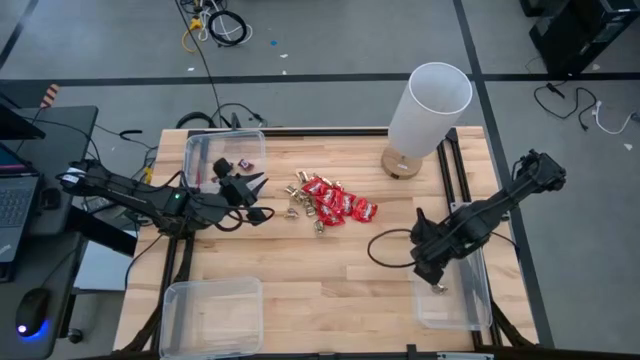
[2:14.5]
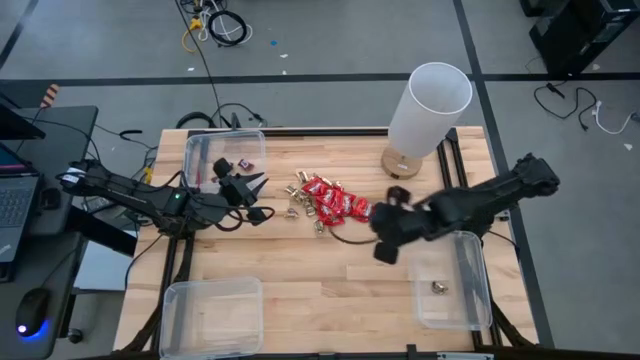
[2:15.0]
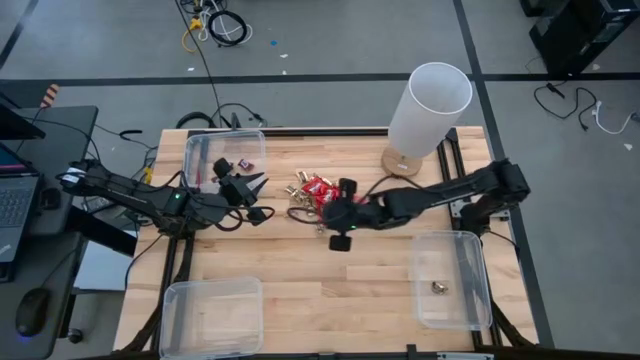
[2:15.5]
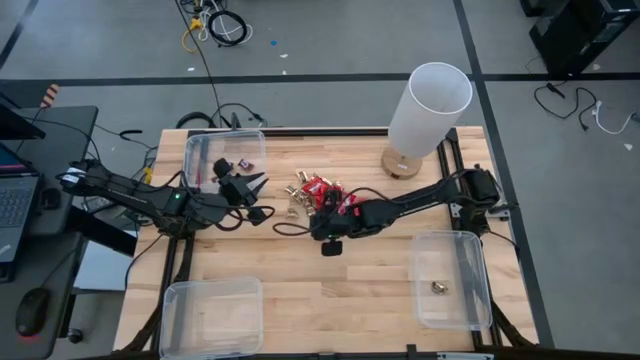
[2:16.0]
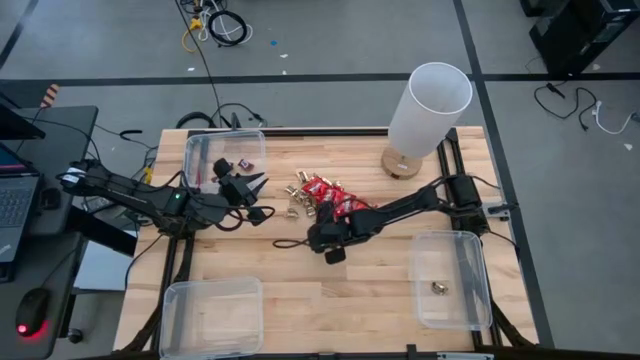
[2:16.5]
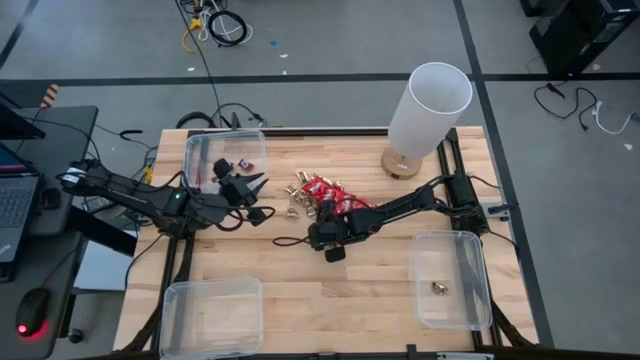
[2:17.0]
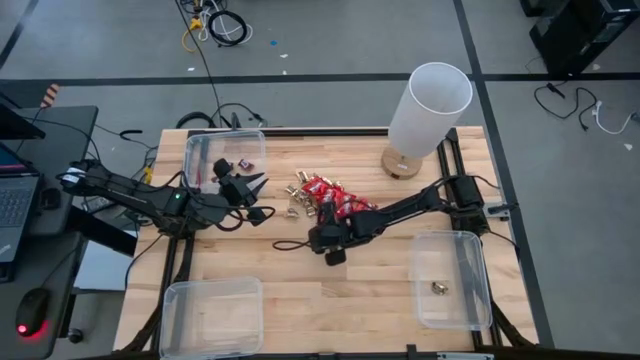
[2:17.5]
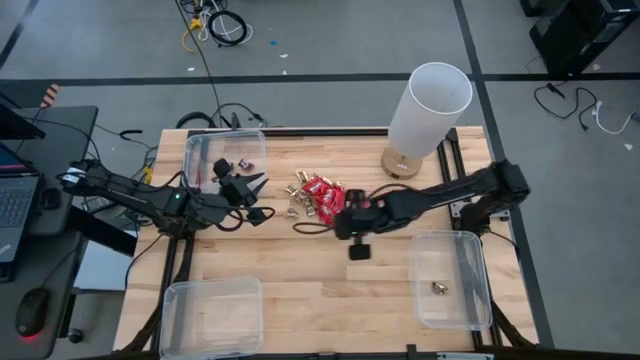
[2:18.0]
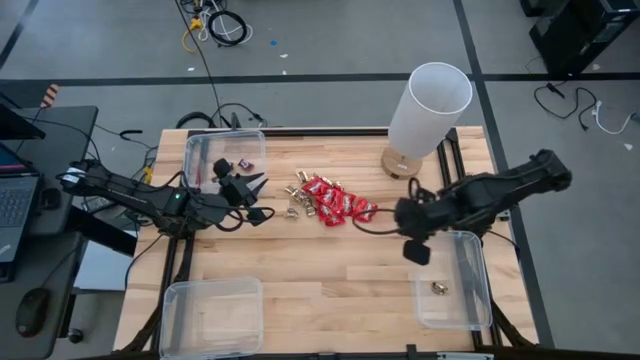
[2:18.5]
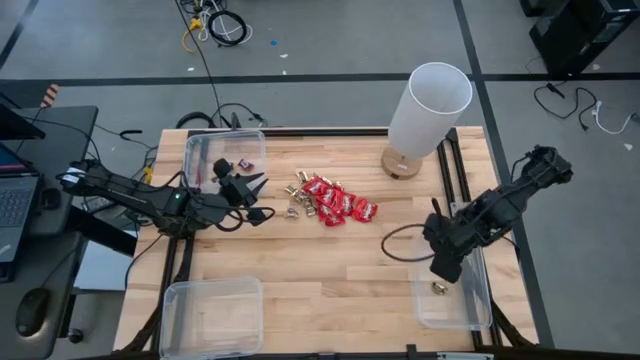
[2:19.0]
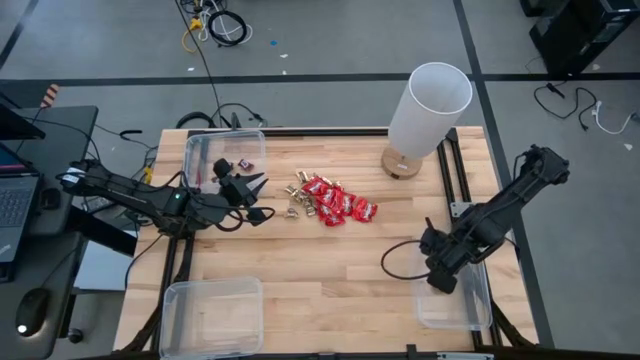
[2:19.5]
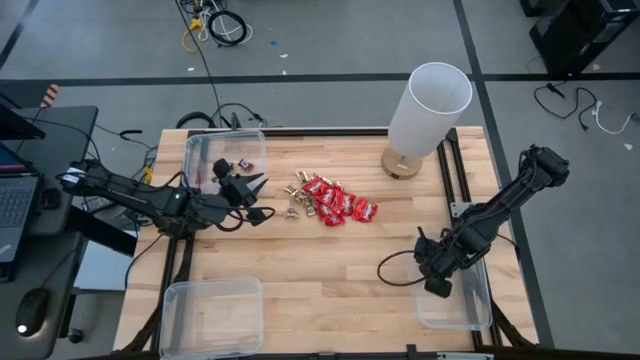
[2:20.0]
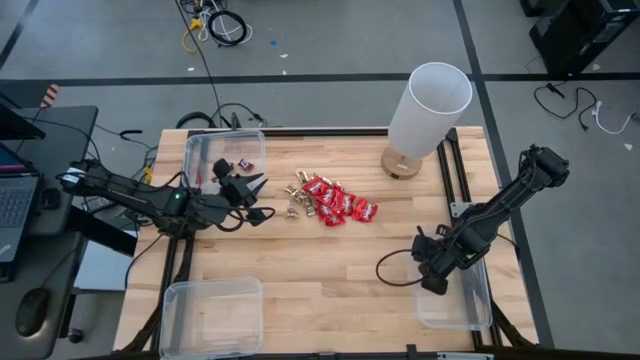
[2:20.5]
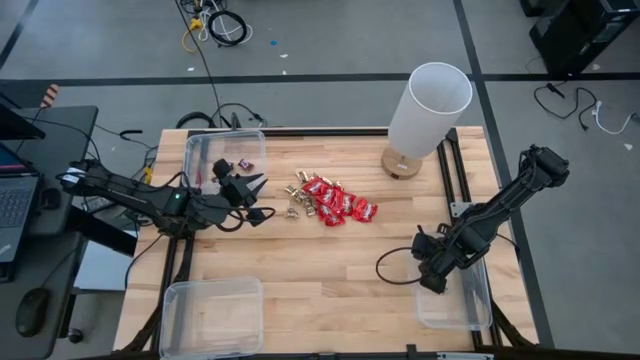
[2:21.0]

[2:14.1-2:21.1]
Task: Sort candy
Put the gold chocolate into the bottom right transparent bin

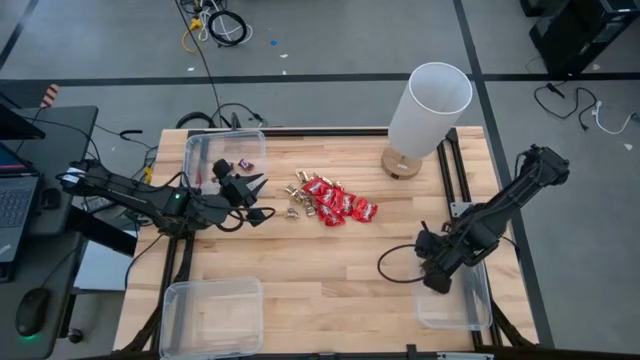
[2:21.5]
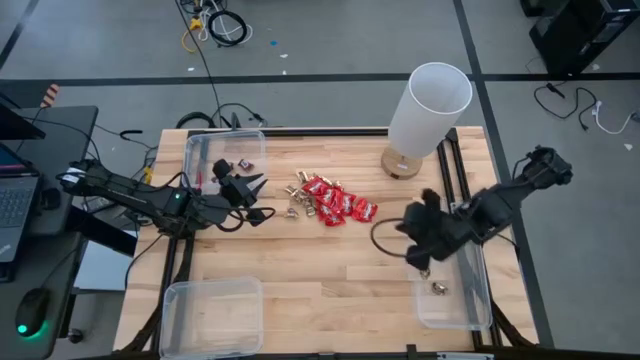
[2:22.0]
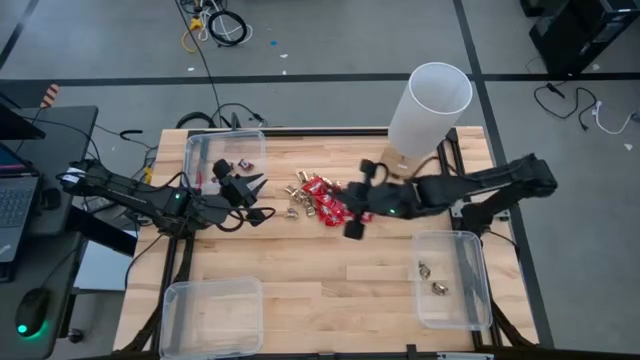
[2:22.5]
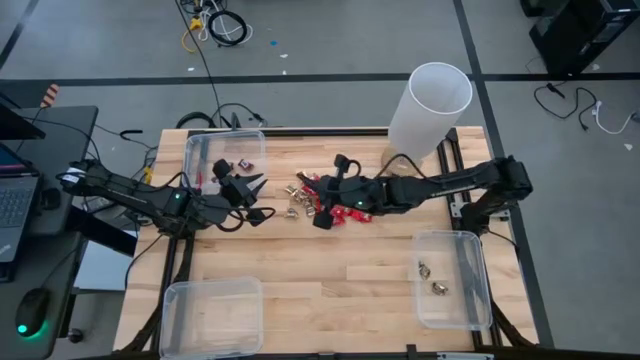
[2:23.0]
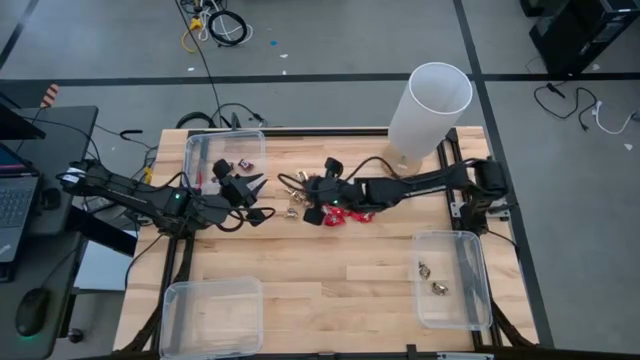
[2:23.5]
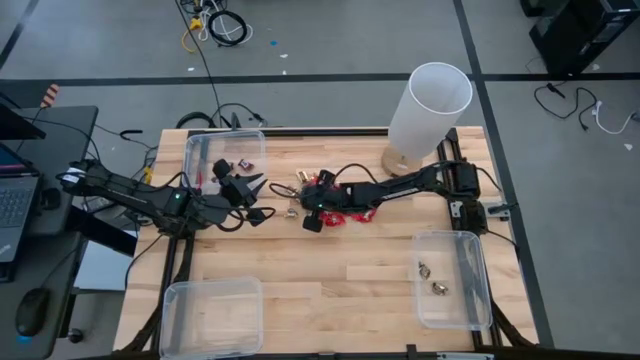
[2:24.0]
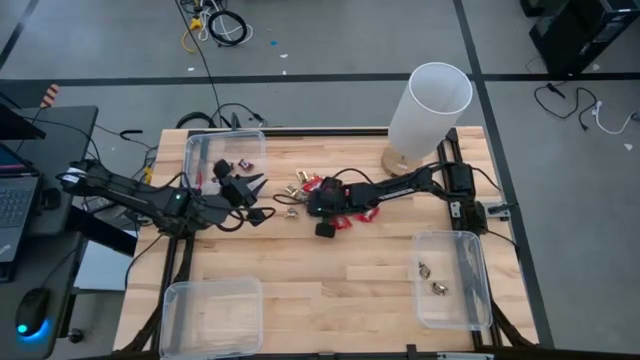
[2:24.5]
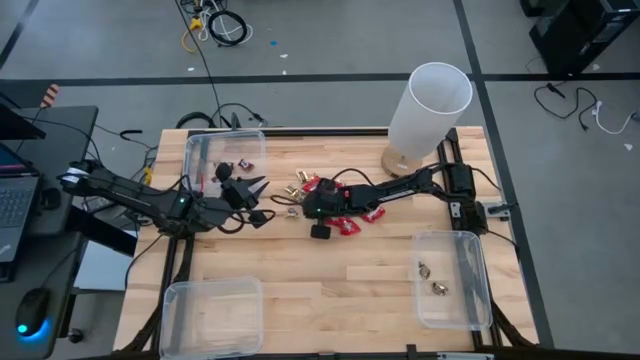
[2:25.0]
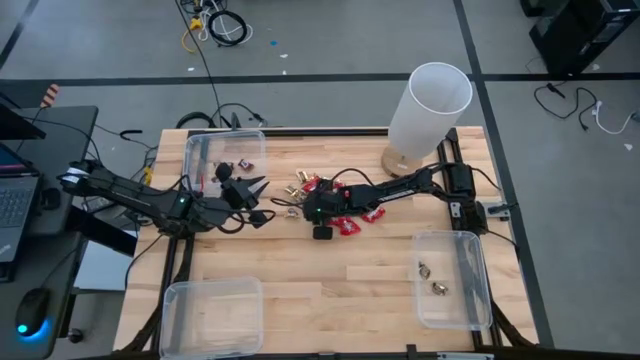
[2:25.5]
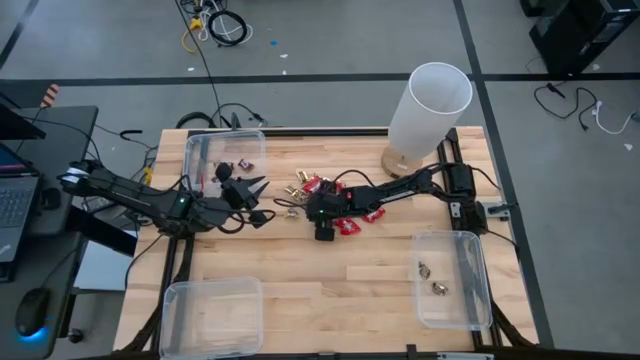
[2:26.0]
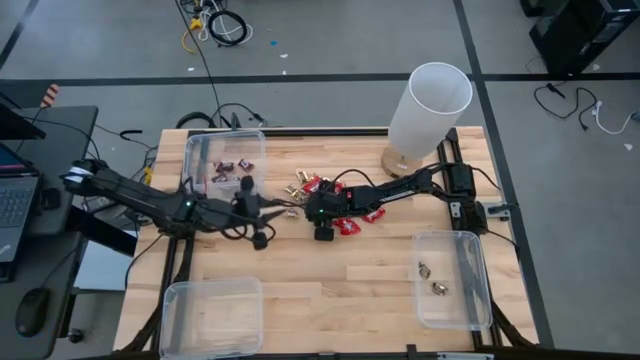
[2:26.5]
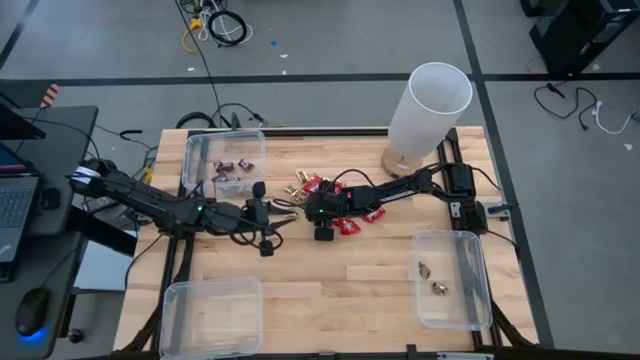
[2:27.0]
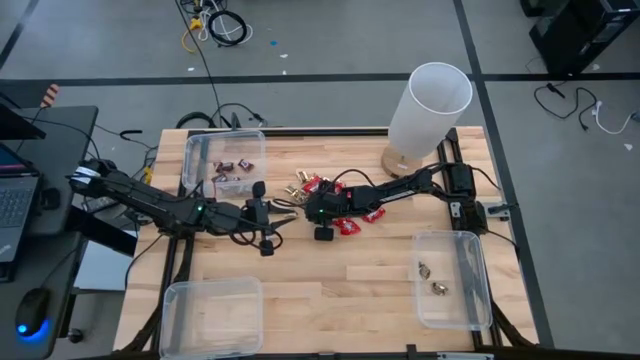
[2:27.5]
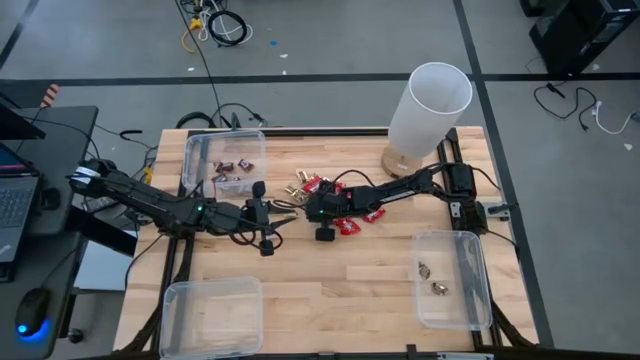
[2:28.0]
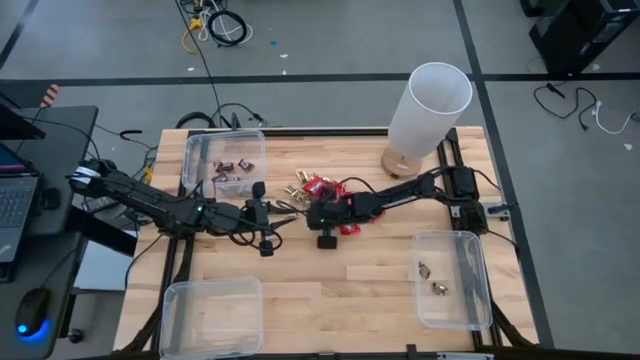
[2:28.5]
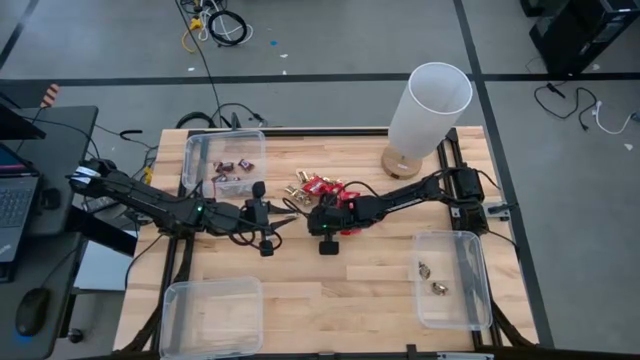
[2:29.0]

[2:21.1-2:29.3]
Put the gold chocolate into the bottom right transparent bin

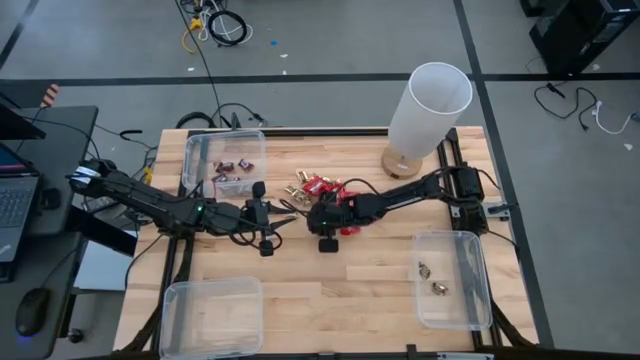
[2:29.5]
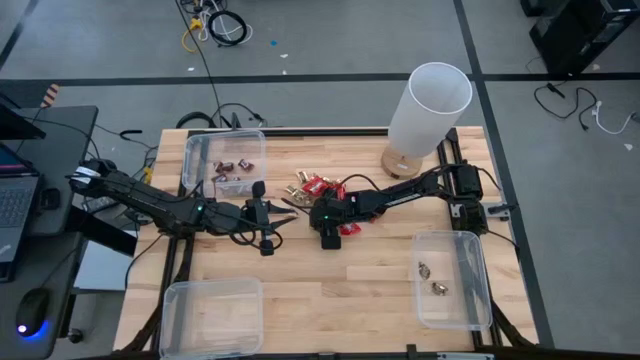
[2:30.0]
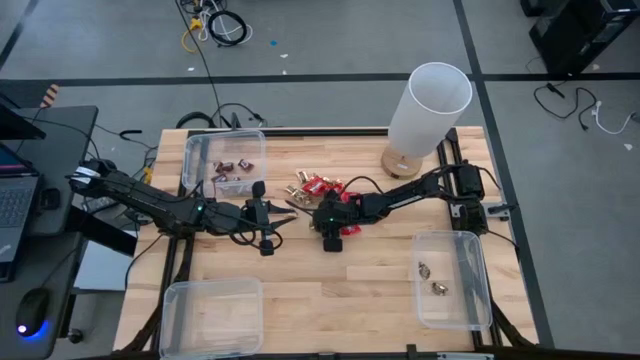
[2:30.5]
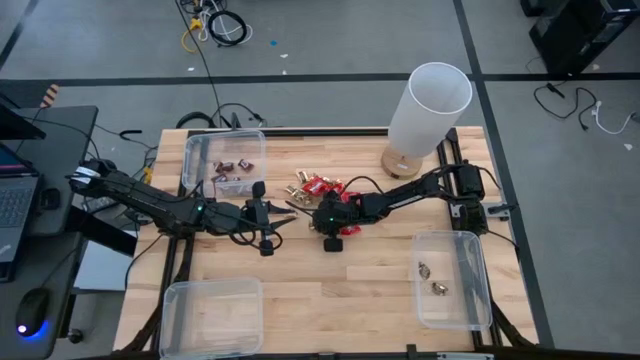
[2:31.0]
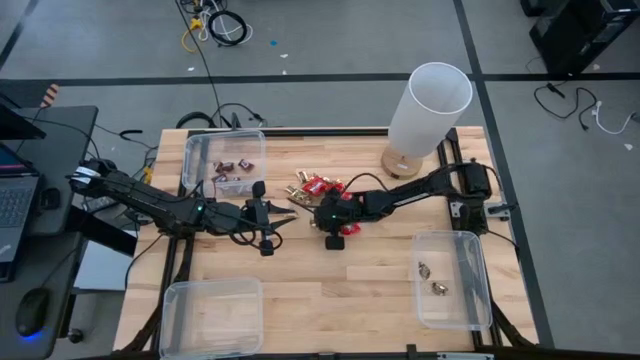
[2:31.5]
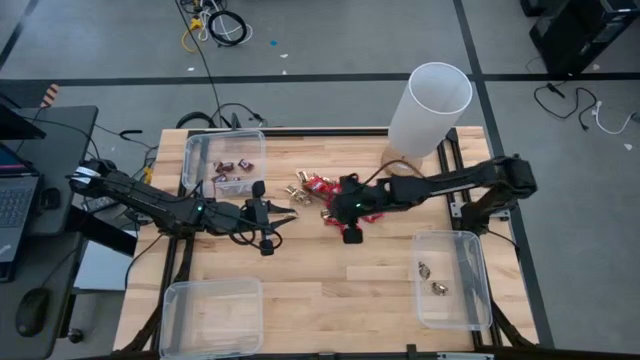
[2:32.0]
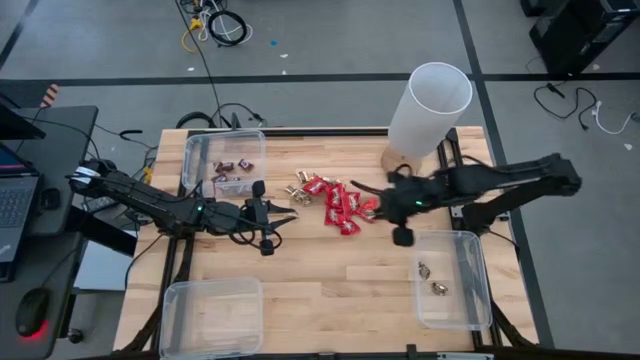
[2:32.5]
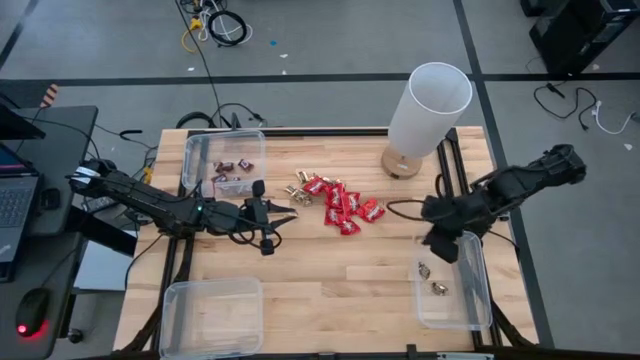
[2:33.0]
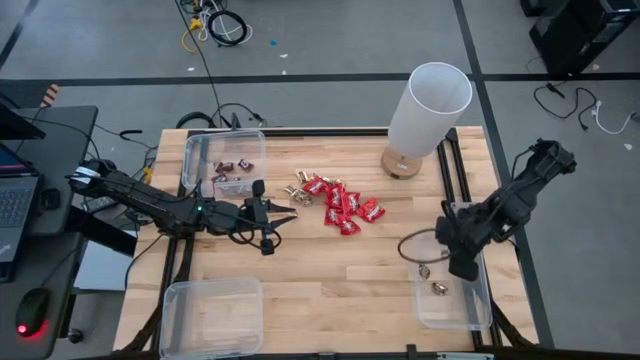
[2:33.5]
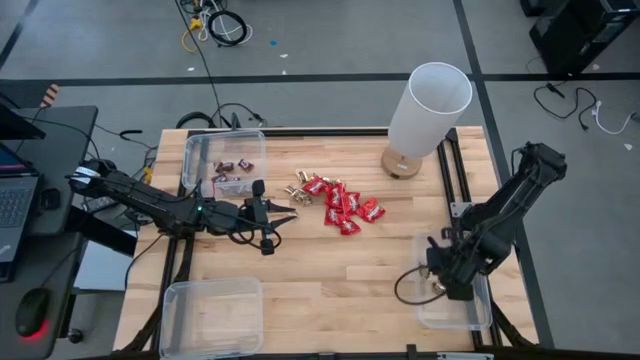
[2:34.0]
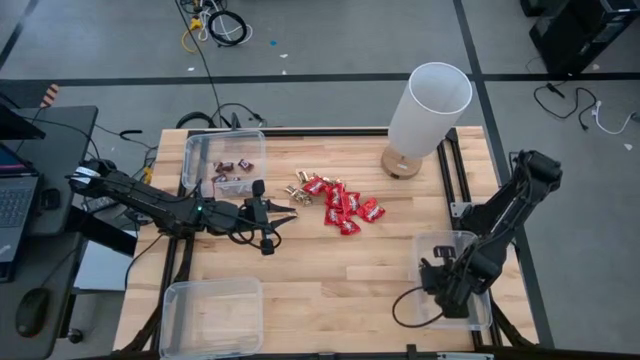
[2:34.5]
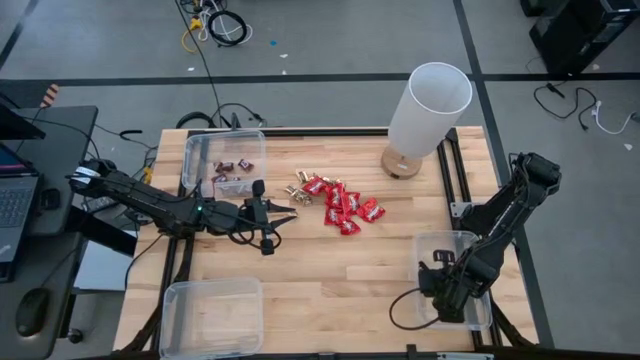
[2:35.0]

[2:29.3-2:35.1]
Put the gold chocolate into the bottom right transparent bin
